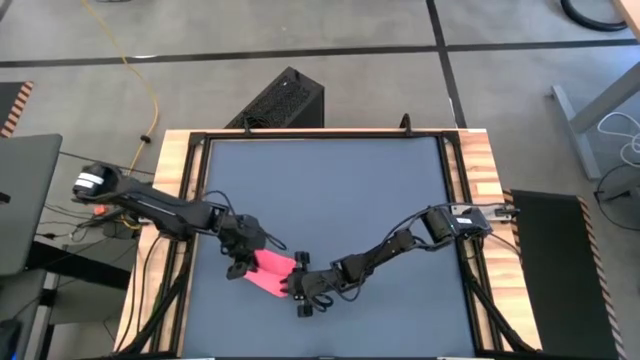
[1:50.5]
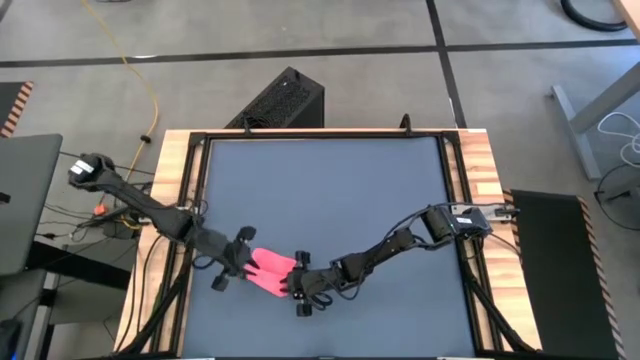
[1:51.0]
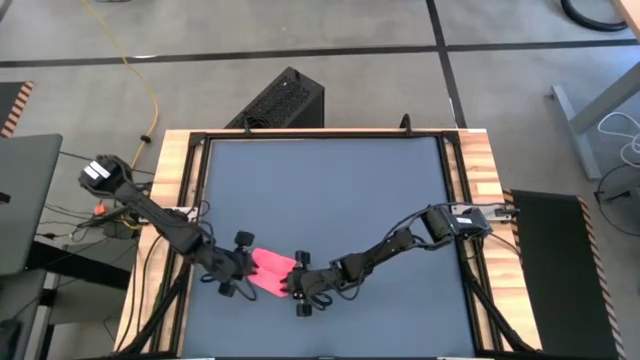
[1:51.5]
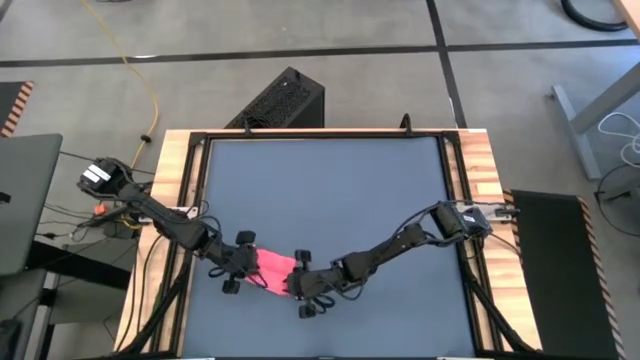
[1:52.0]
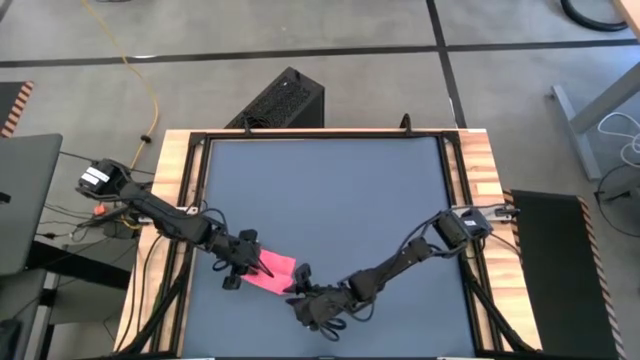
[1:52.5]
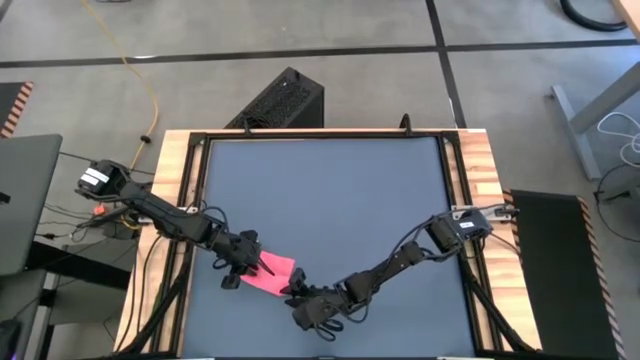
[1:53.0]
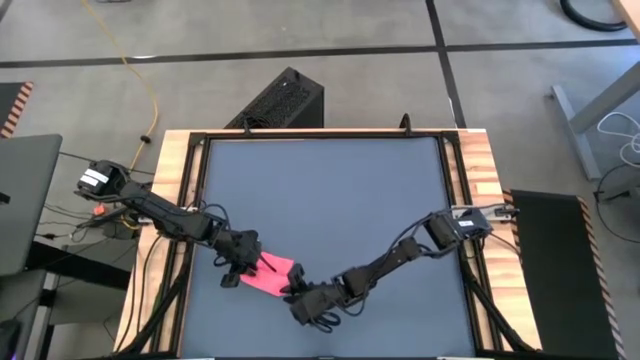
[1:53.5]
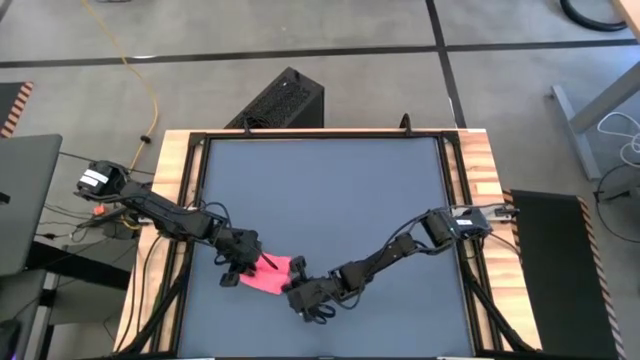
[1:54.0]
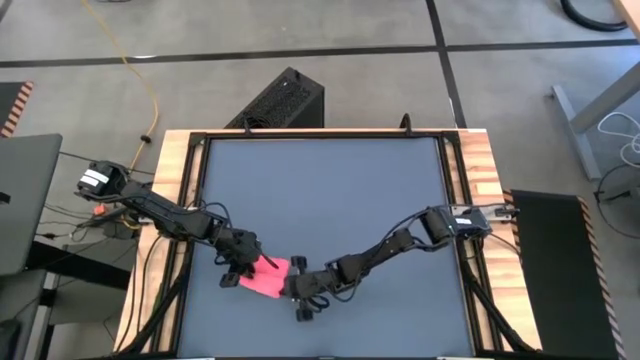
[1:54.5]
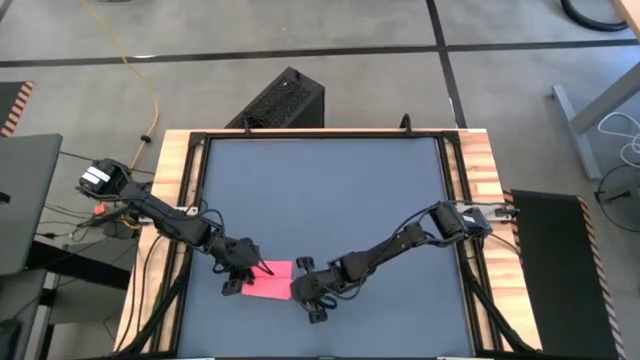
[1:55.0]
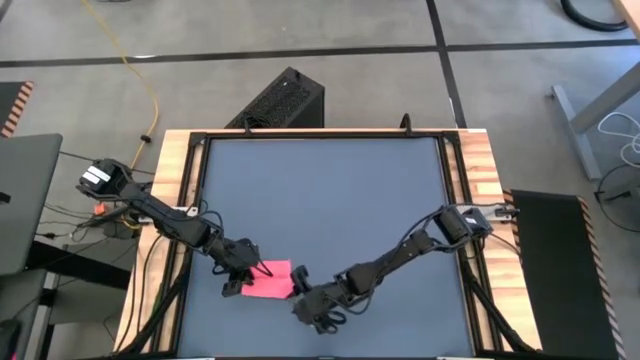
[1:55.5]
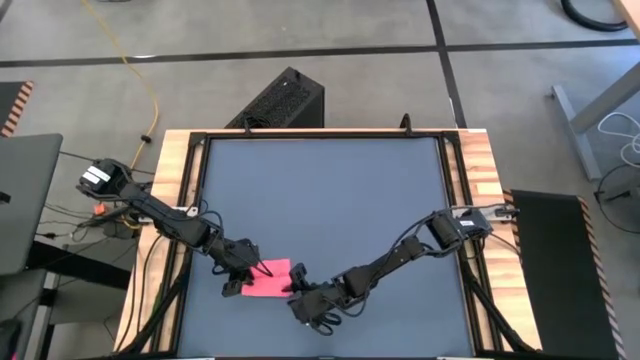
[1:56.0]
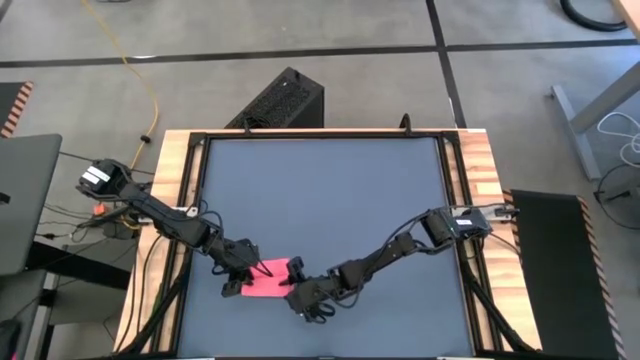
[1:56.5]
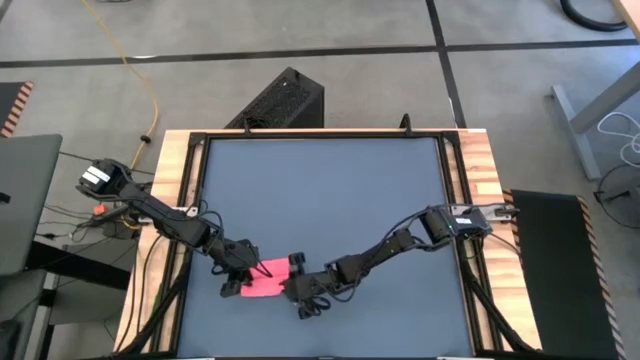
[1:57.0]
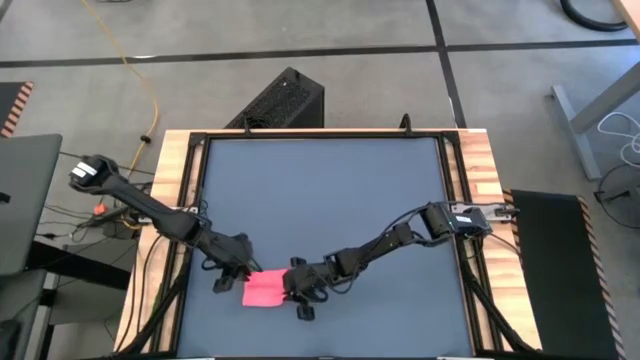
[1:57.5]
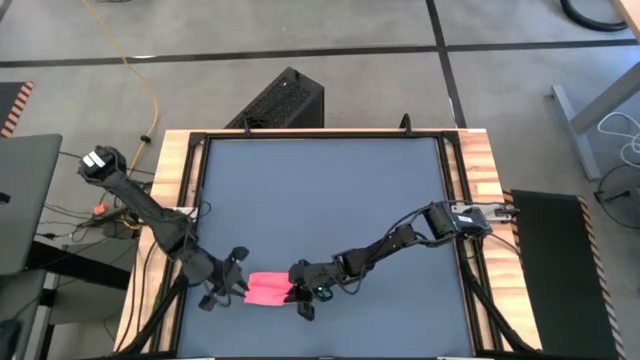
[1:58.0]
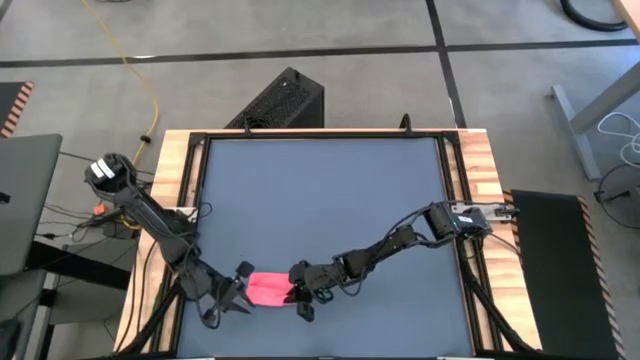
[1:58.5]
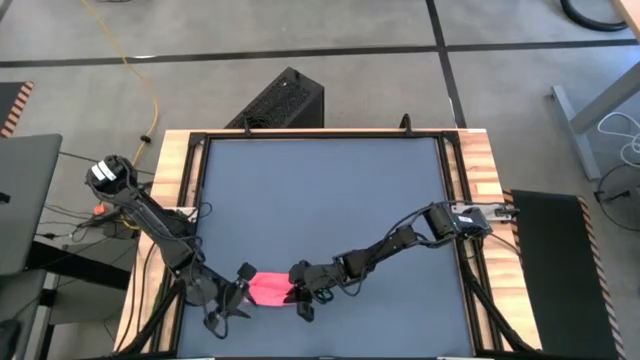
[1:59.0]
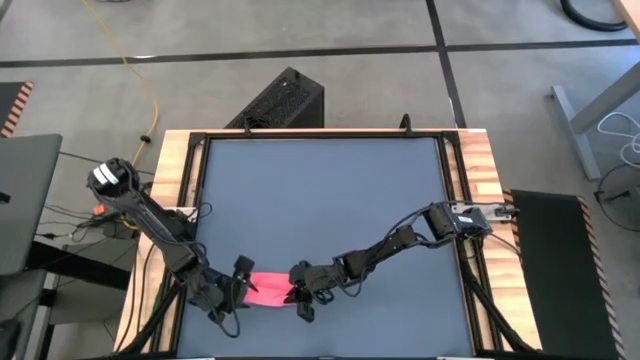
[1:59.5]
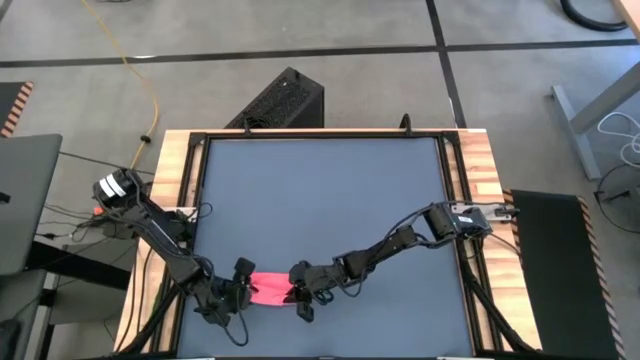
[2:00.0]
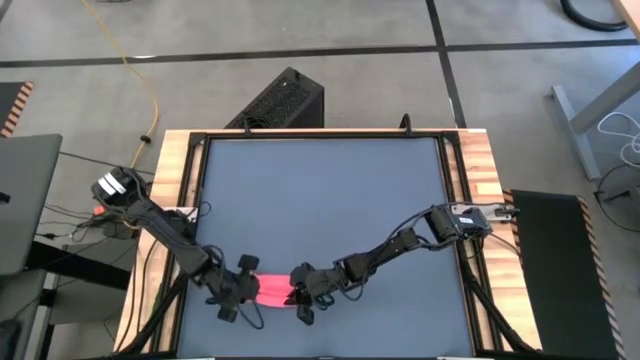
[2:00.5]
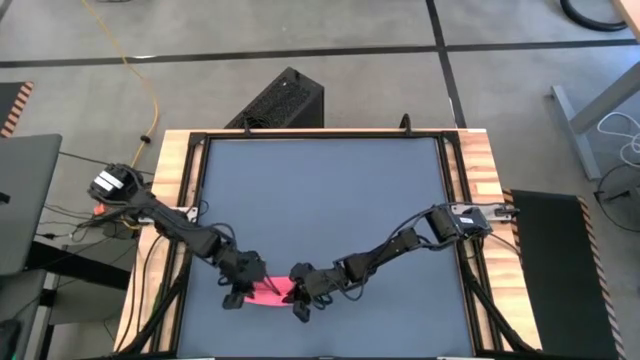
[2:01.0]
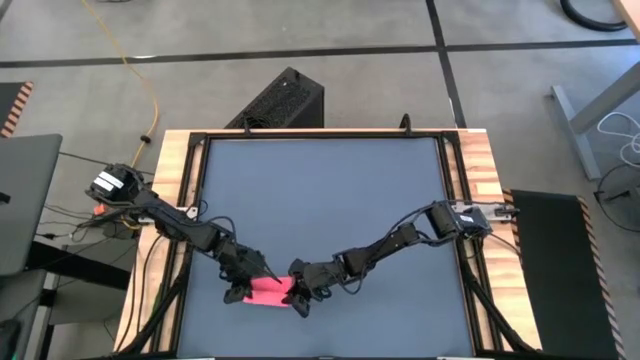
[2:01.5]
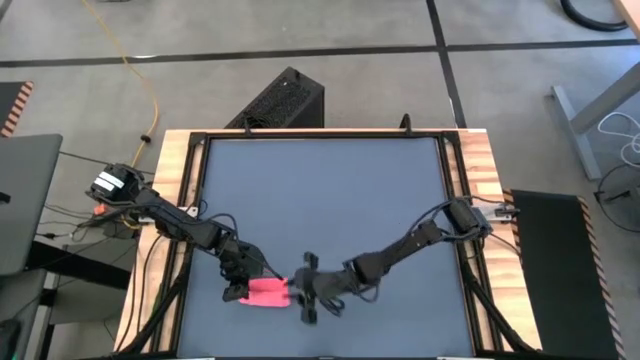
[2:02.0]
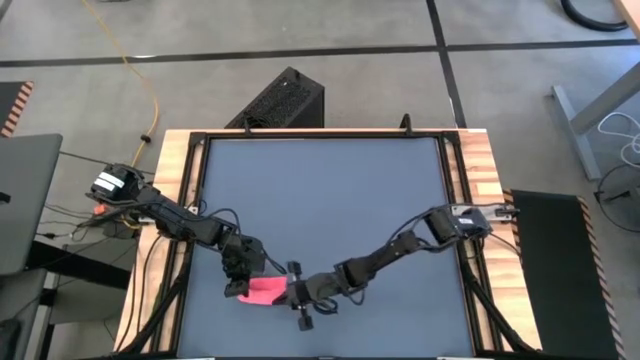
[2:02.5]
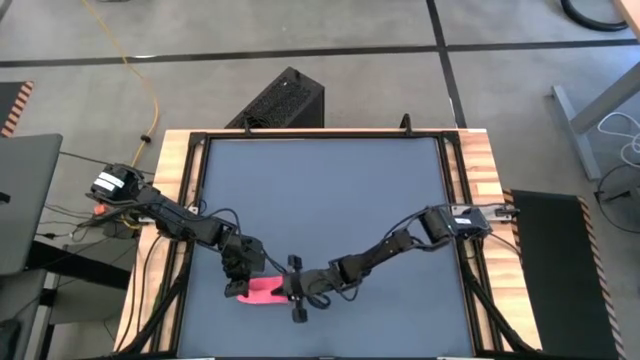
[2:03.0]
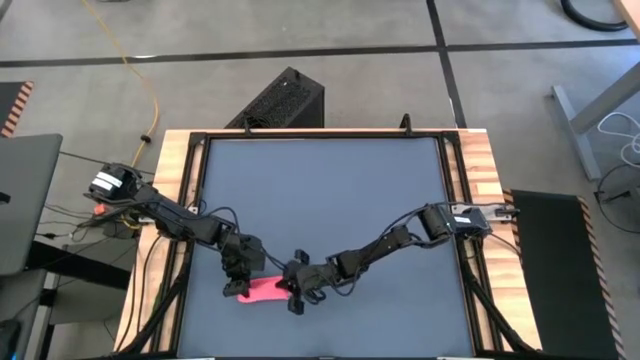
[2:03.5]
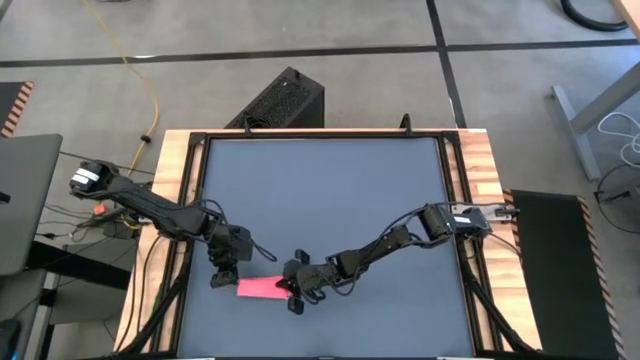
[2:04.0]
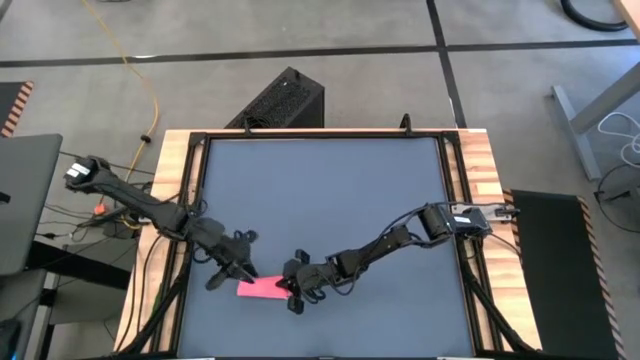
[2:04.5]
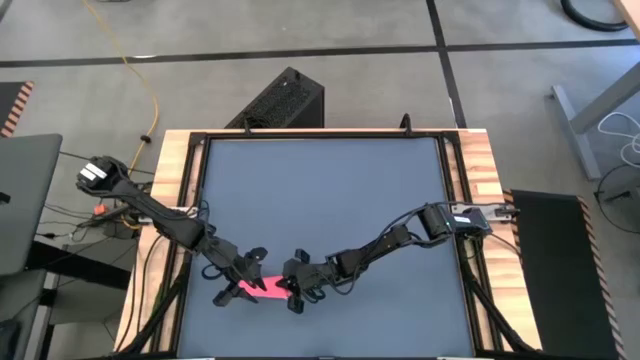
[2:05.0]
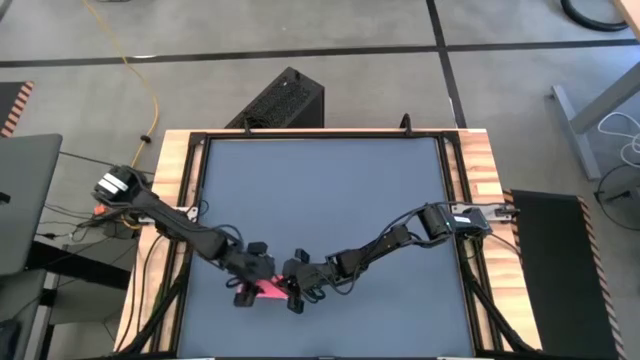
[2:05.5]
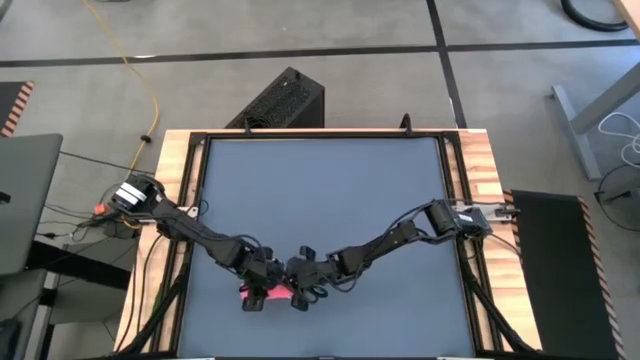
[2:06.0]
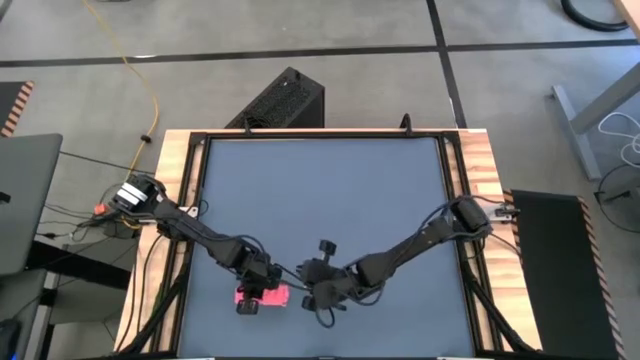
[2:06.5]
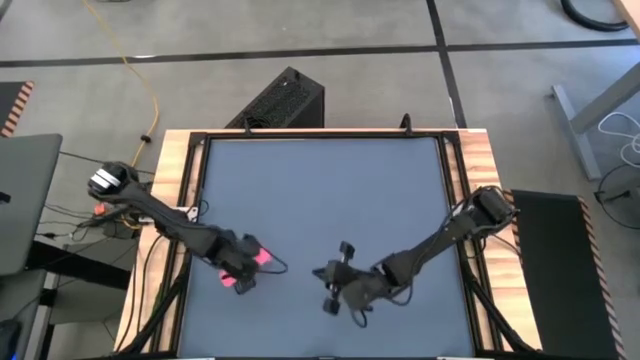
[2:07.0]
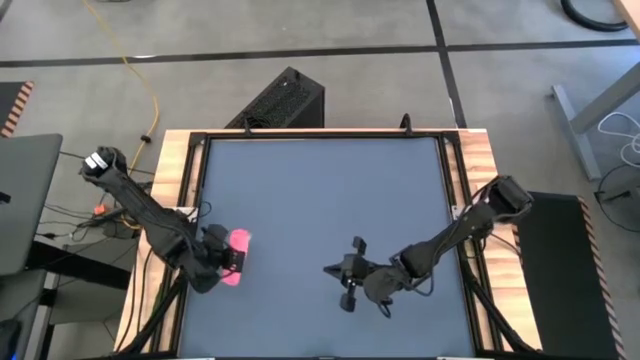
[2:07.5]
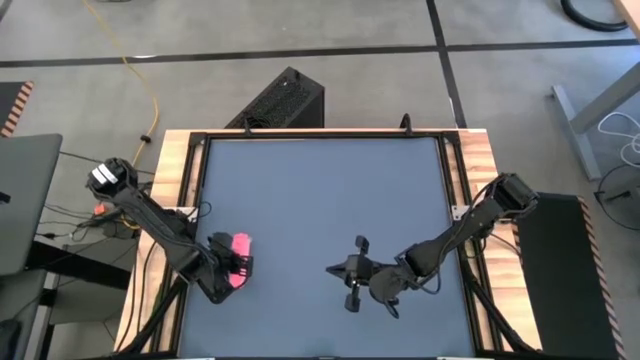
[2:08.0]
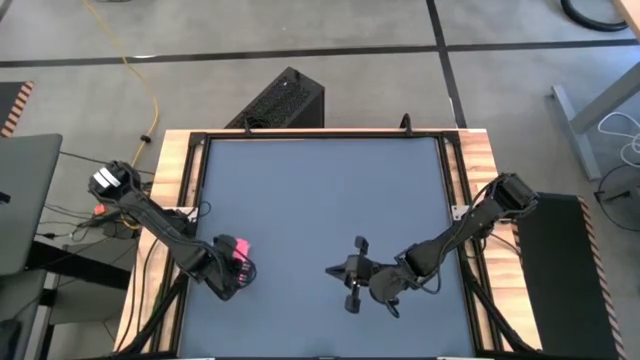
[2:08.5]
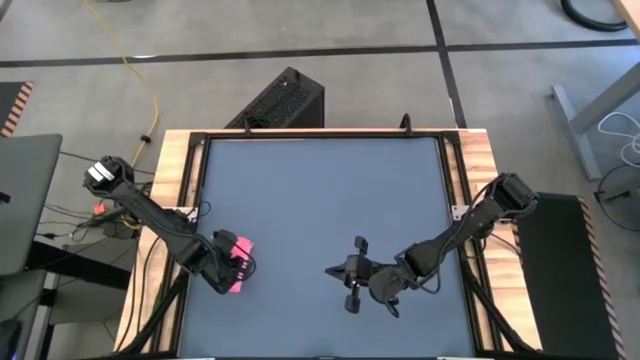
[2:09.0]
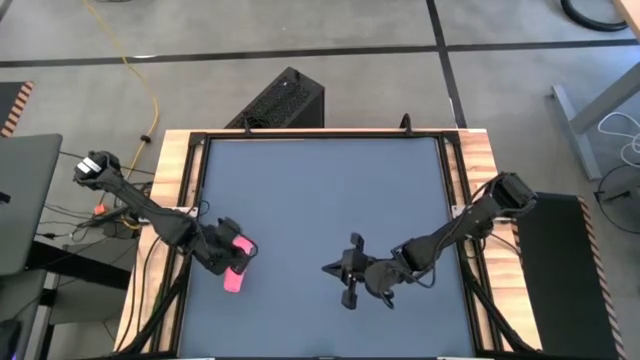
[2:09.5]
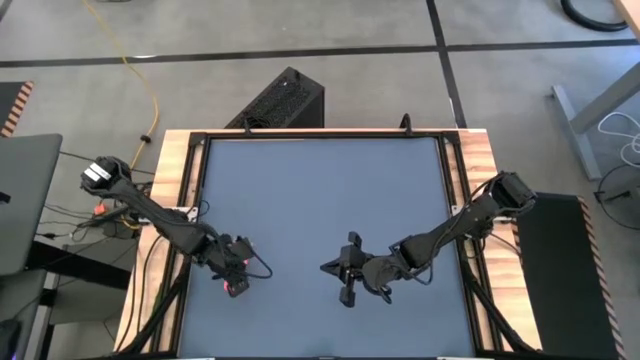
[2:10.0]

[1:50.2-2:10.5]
Task: Roll towel
Roll the pink microfiber towel
